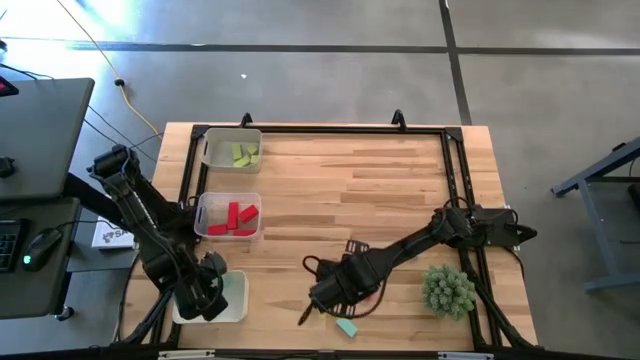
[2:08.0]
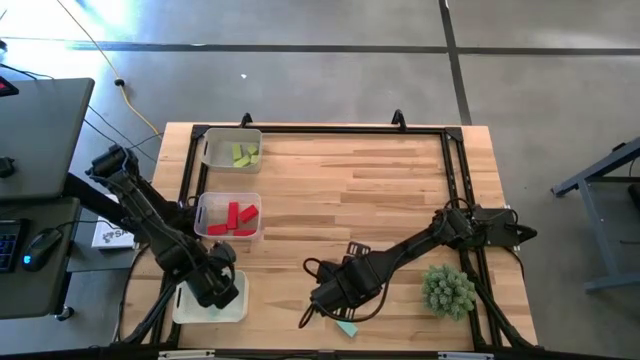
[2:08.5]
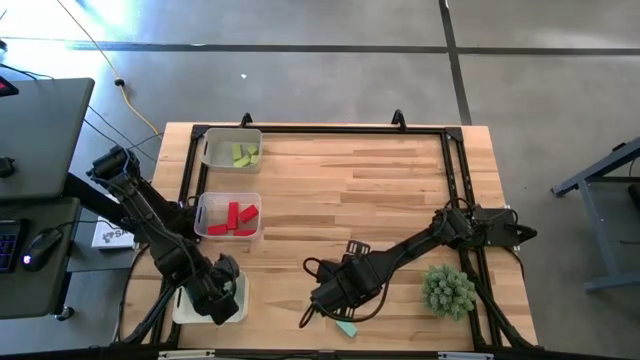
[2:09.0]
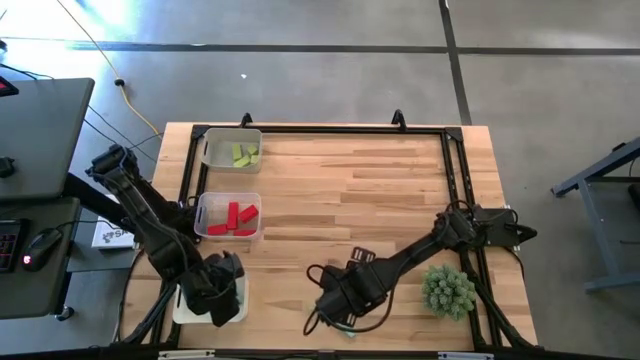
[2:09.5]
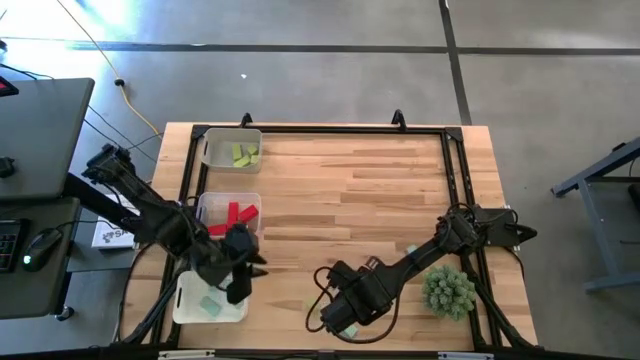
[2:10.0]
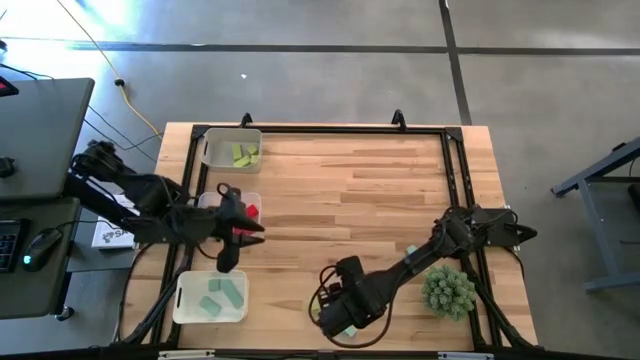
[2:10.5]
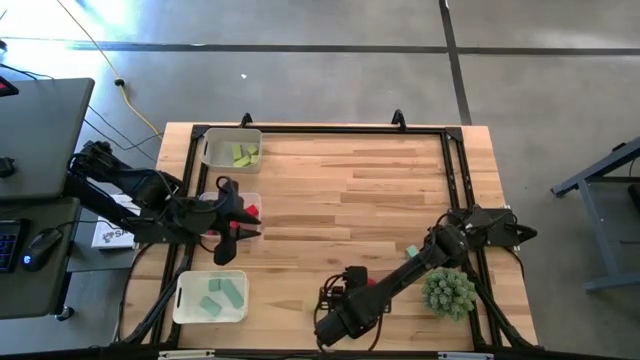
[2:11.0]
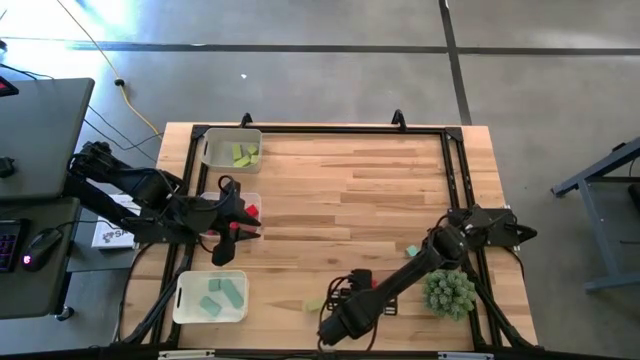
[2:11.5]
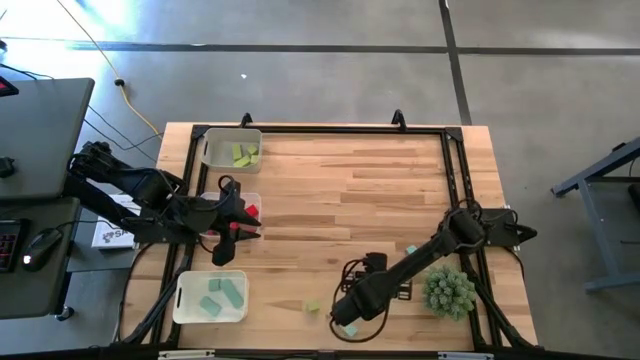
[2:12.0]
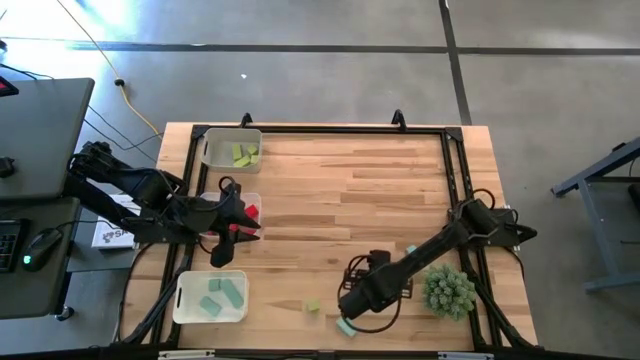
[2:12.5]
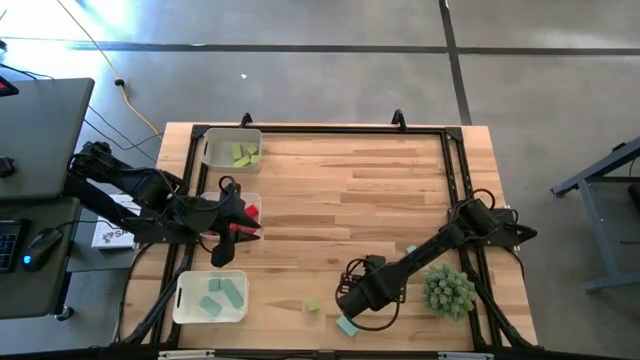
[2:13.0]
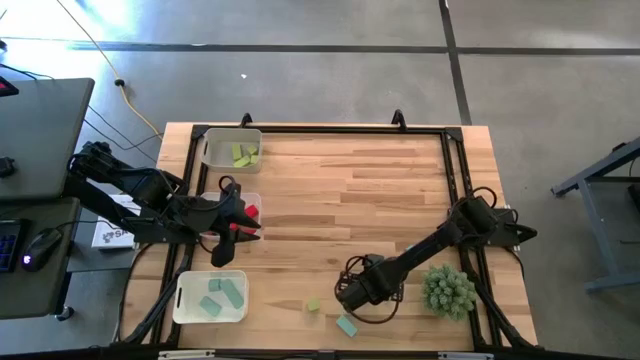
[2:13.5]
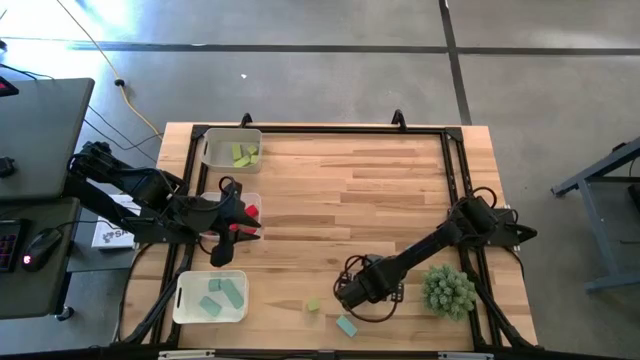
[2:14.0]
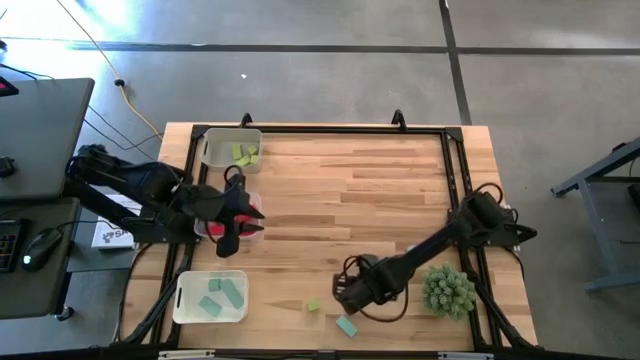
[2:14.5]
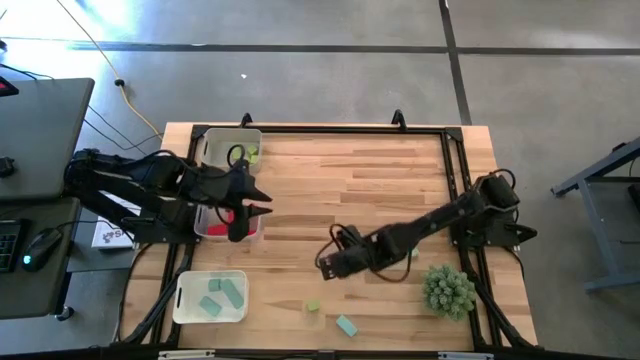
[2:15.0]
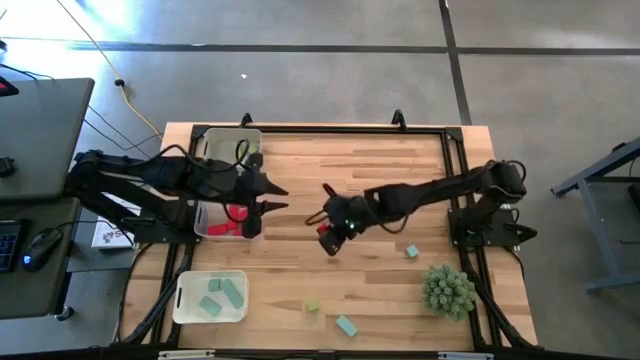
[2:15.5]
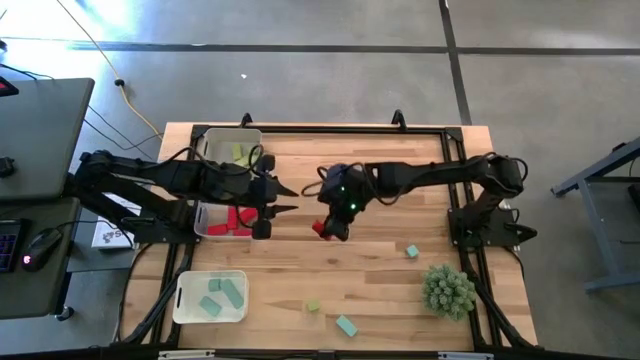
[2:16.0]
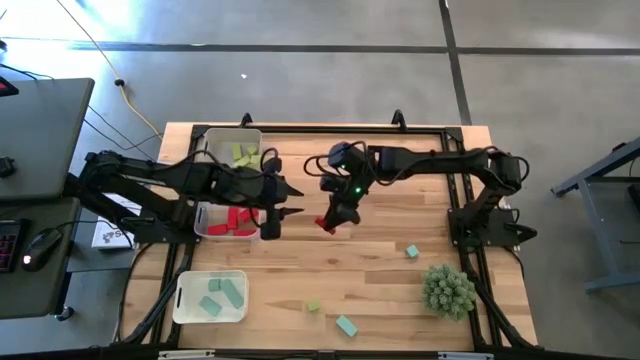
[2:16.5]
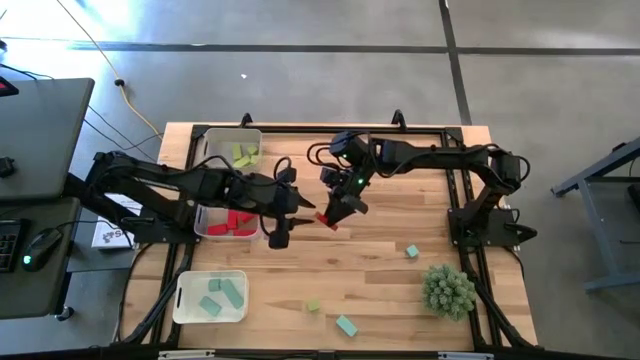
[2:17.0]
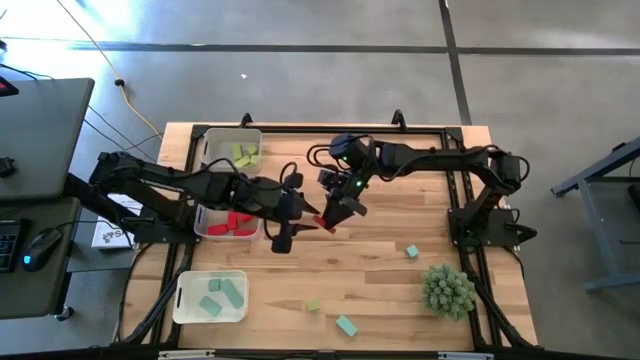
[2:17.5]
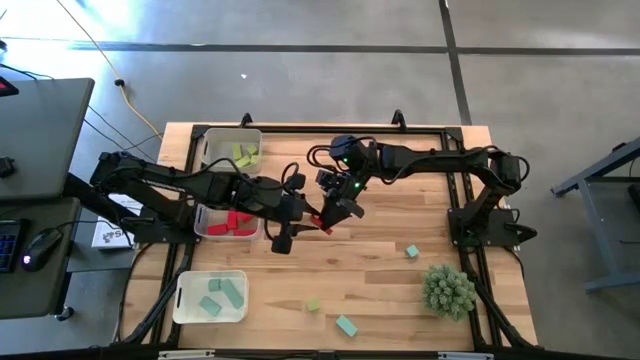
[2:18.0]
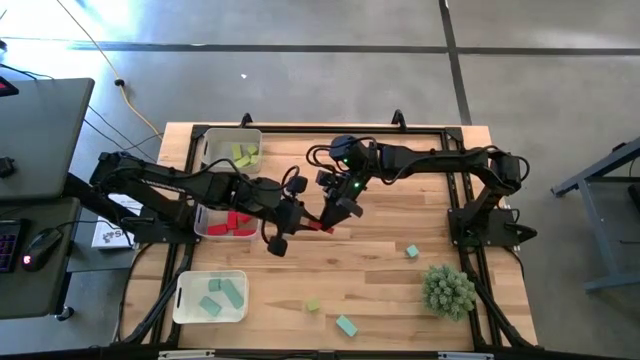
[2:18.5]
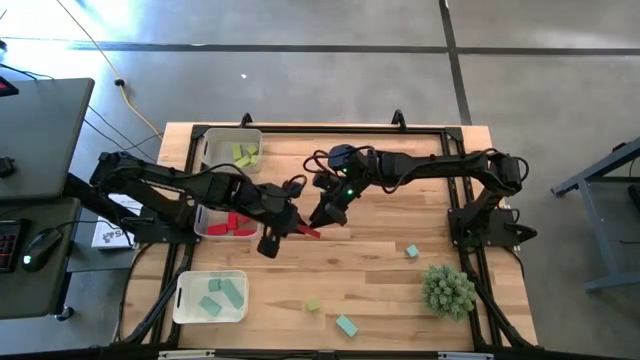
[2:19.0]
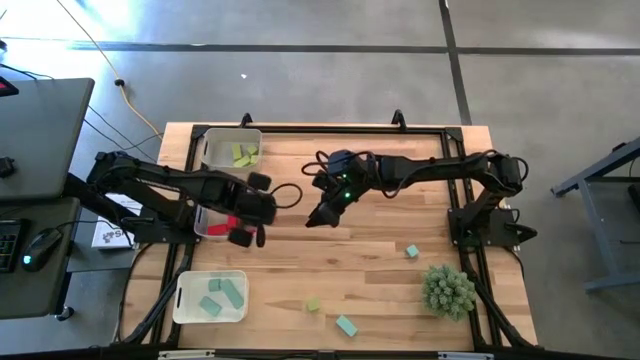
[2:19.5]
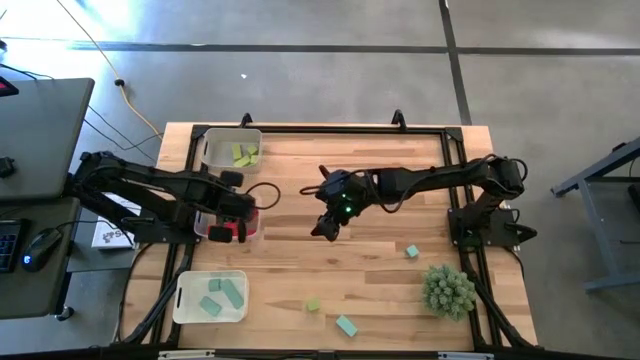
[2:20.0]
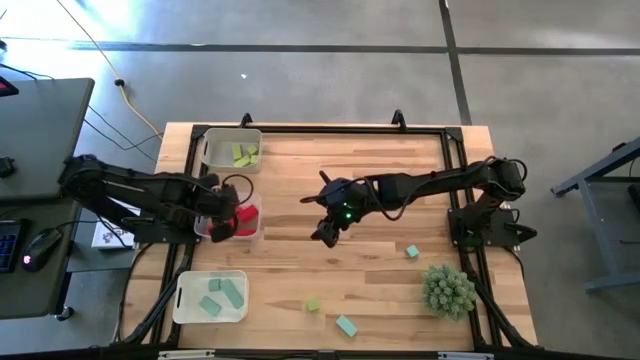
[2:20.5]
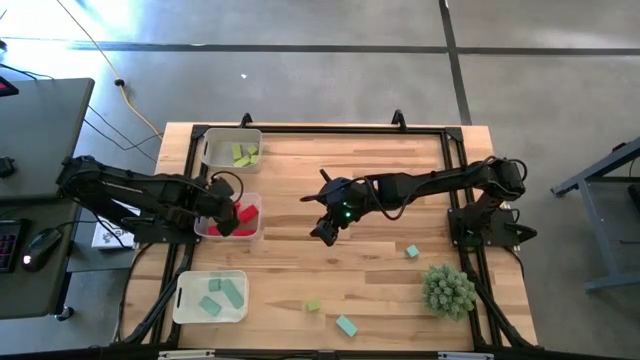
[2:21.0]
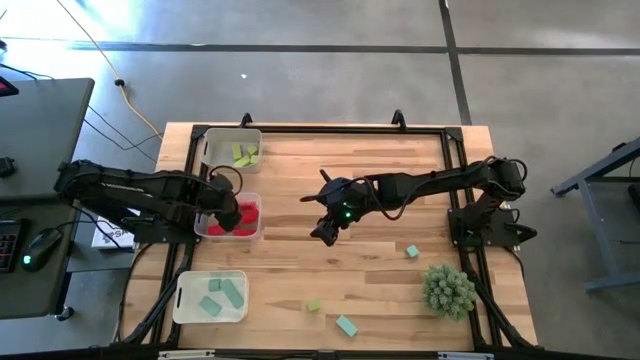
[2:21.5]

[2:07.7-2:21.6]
Task: Sort & place blocks by color
Put the red block into the transparent bin

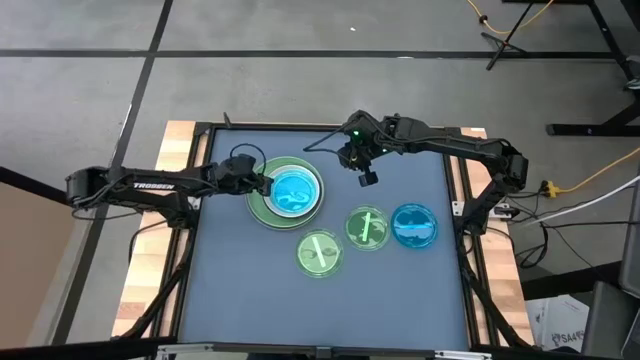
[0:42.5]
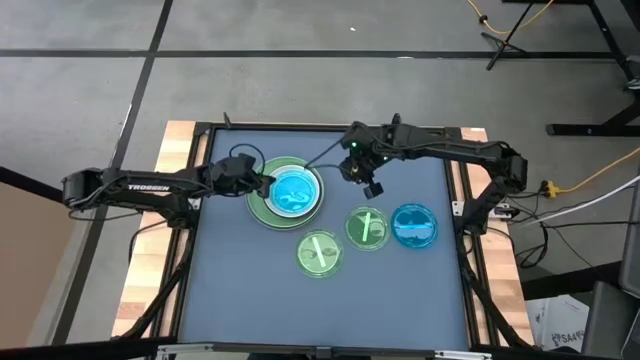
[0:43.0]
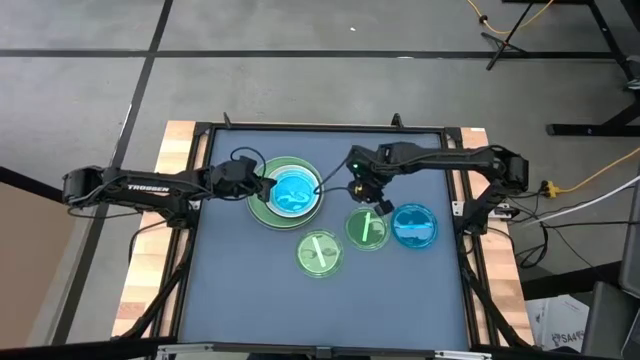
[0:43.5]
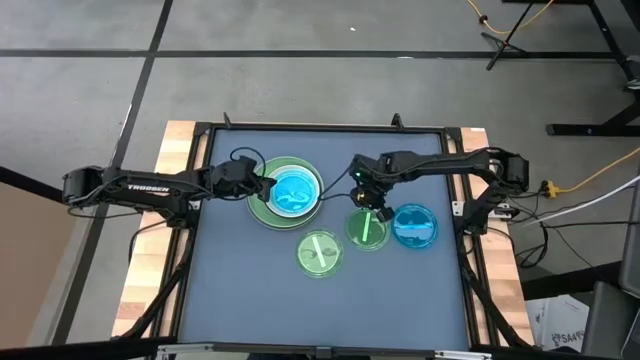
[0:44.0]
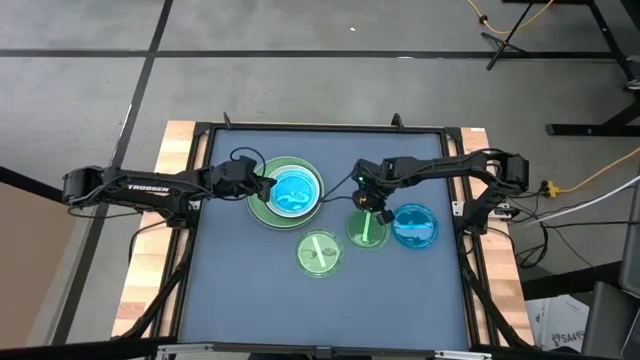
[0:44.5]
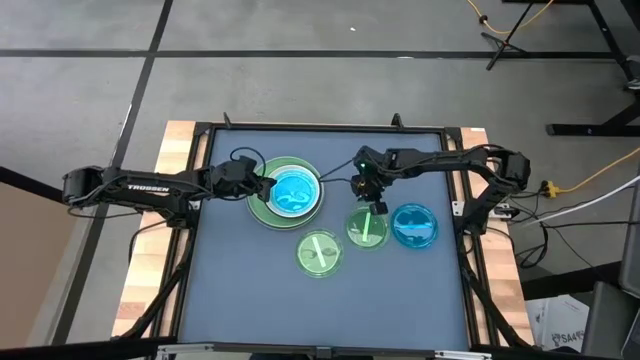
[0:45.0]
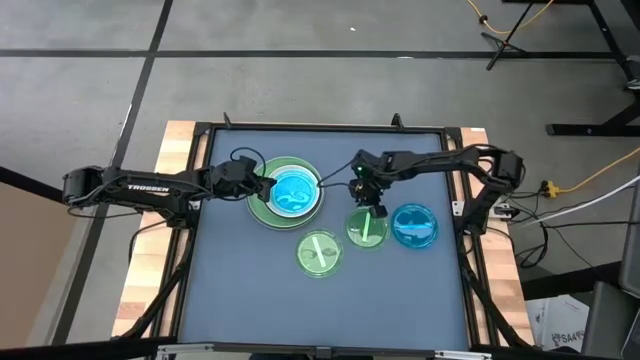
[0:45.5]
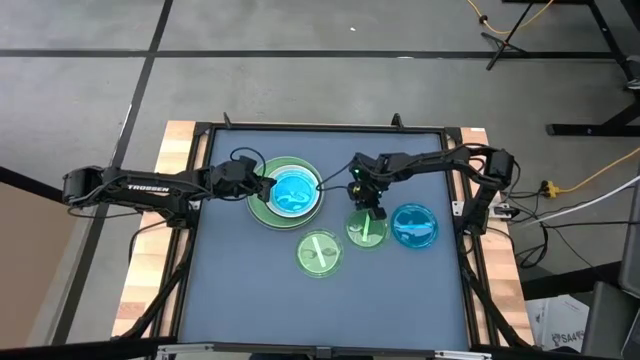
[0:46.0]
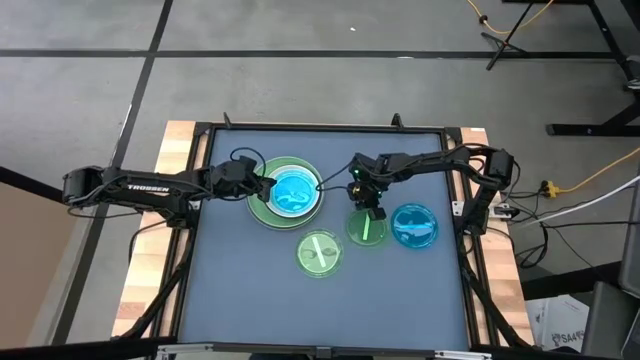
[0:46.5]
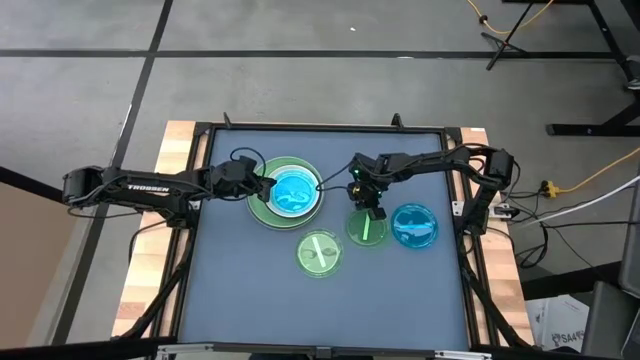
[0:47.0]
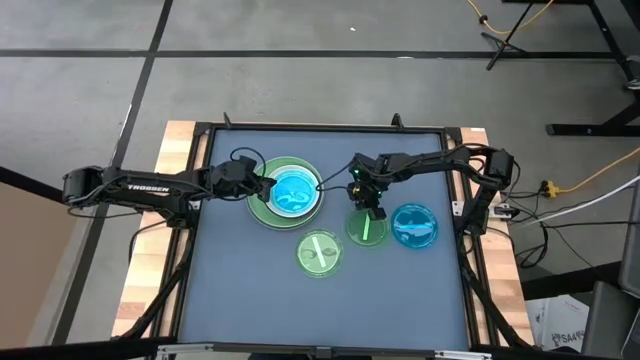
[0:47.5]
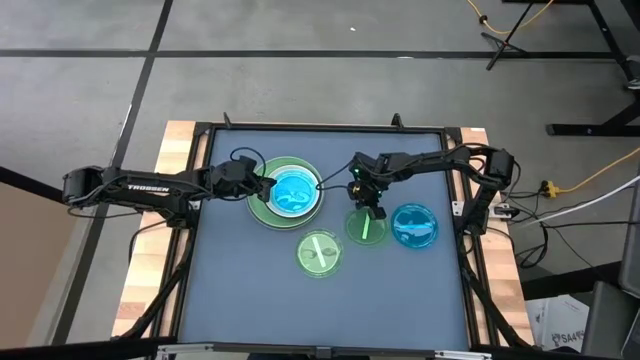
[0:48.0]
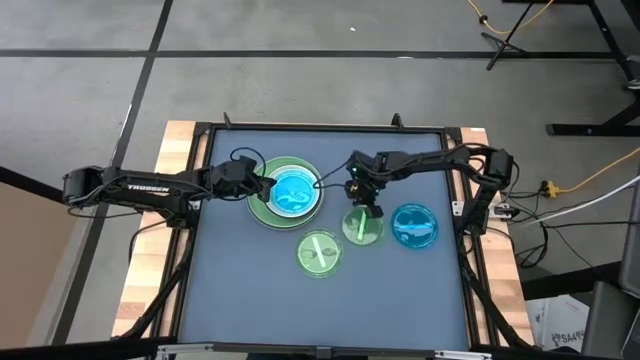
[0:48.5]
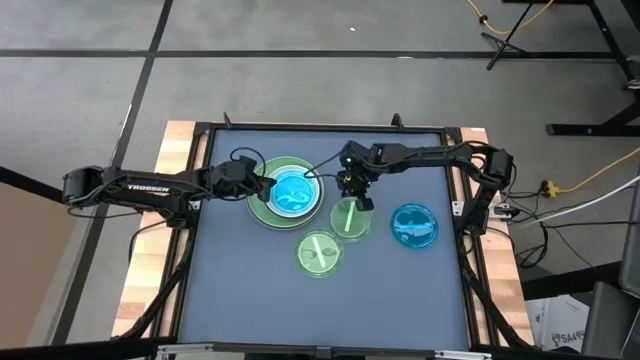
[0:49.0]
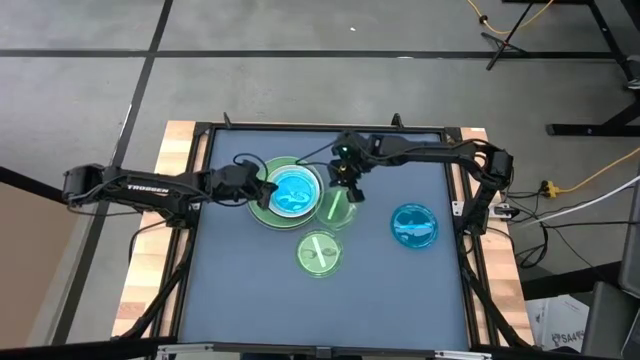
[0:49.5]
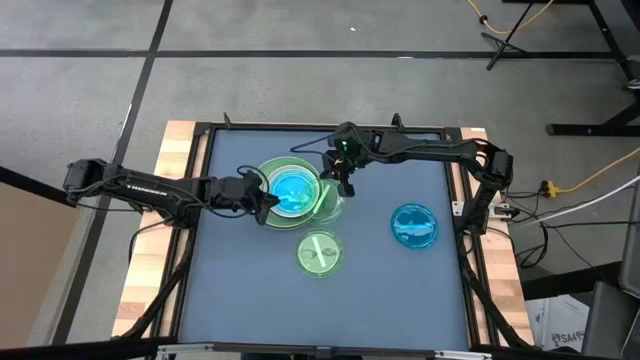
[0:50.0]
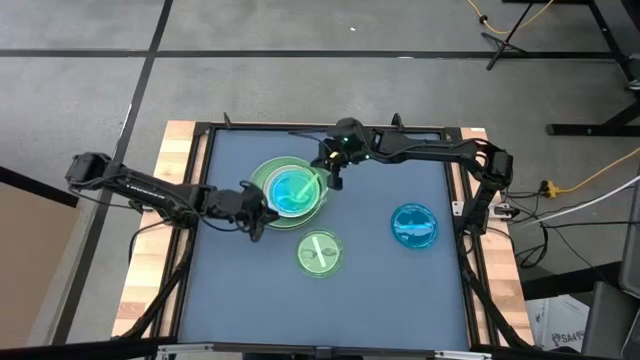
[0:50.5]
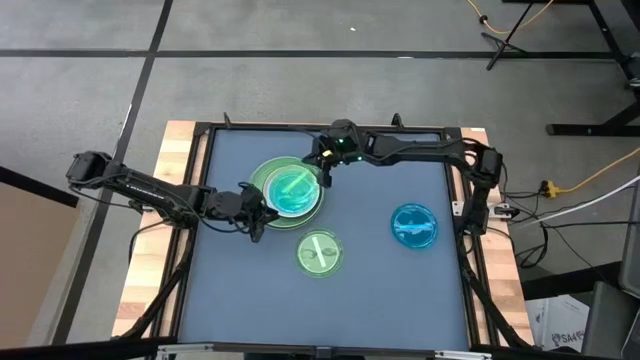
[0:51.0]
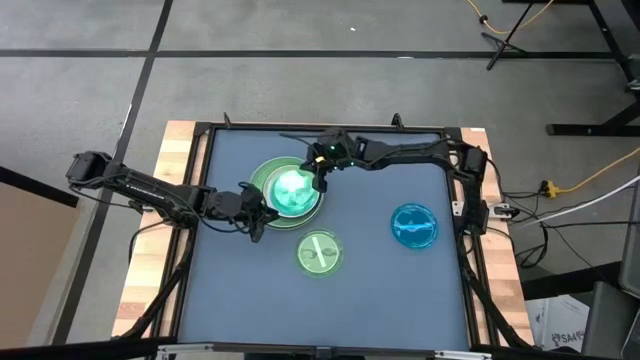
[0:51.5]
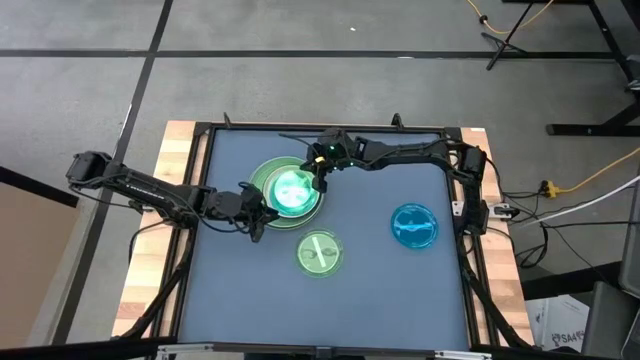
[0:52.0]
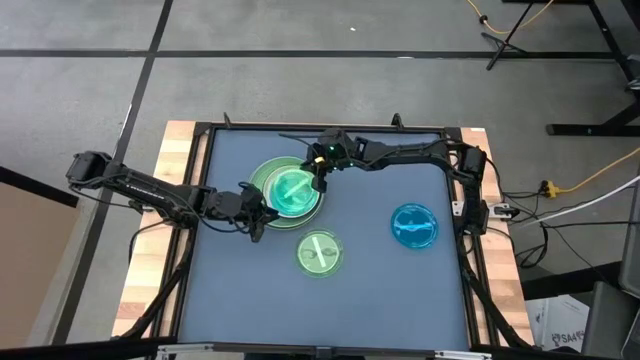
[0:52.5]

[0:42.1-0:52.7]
Task: Stack plastic plates
Stack the right transparent green plate on top of the blue transparent plate
